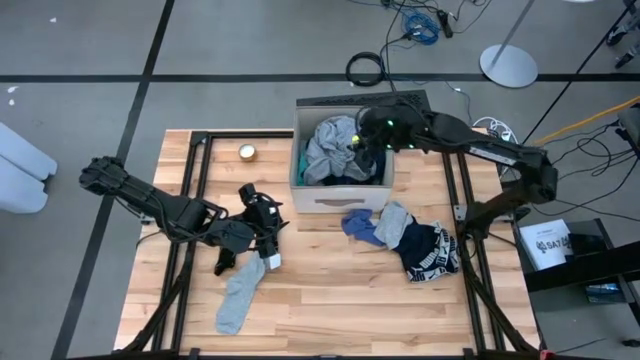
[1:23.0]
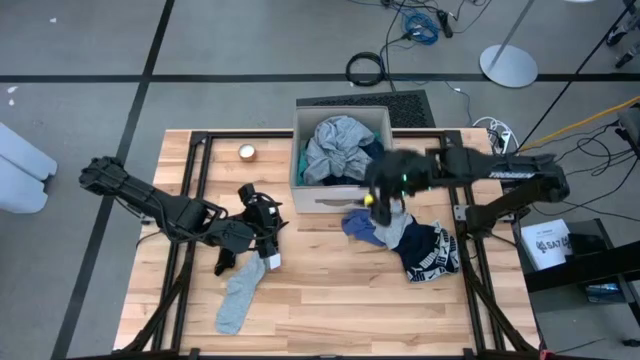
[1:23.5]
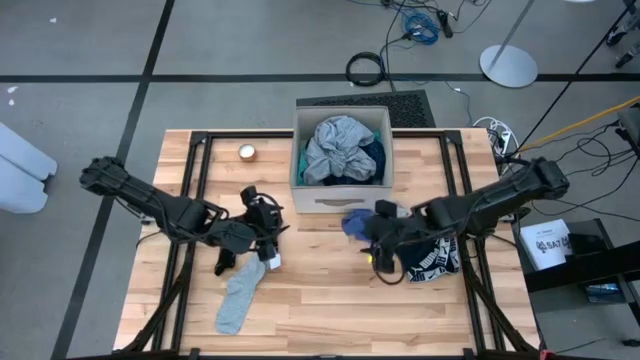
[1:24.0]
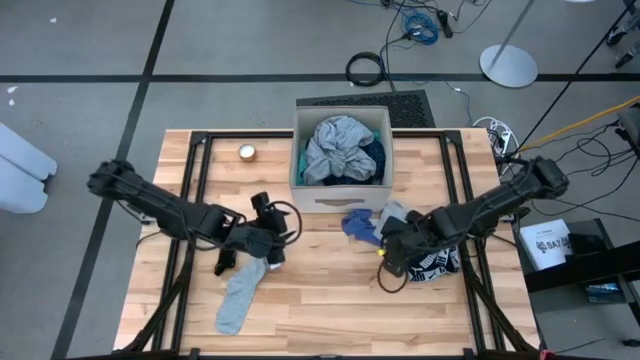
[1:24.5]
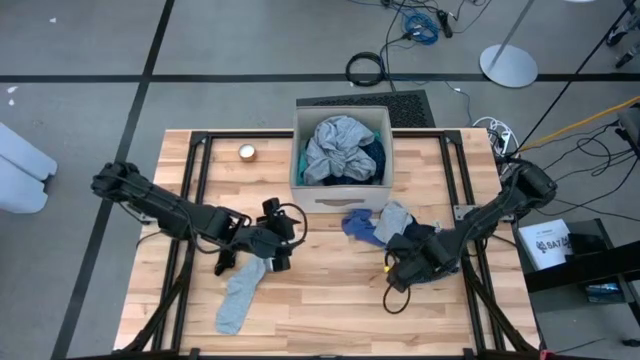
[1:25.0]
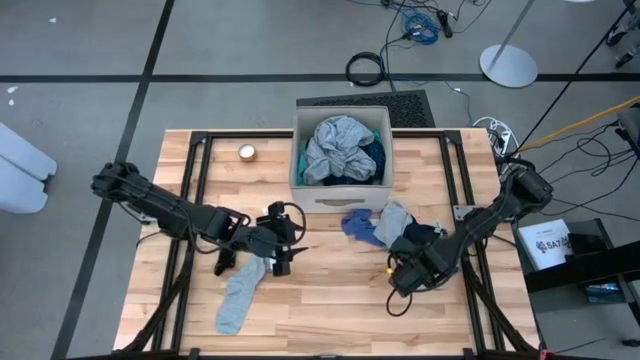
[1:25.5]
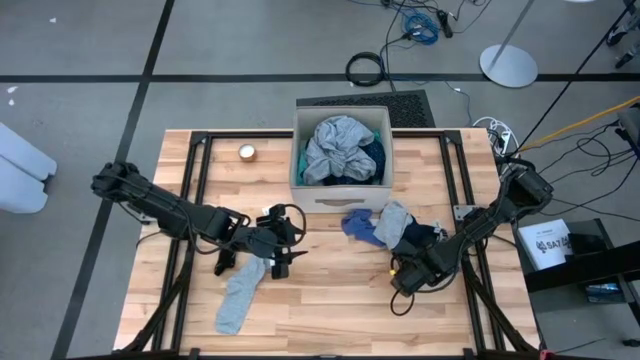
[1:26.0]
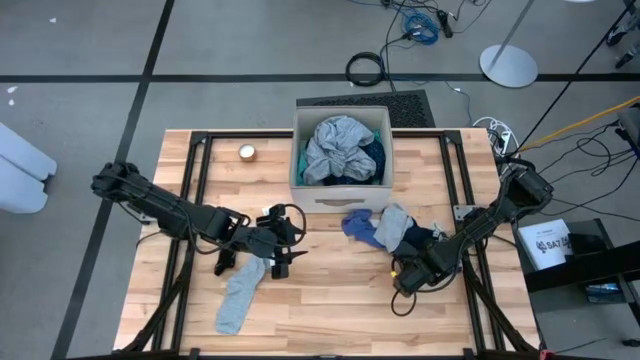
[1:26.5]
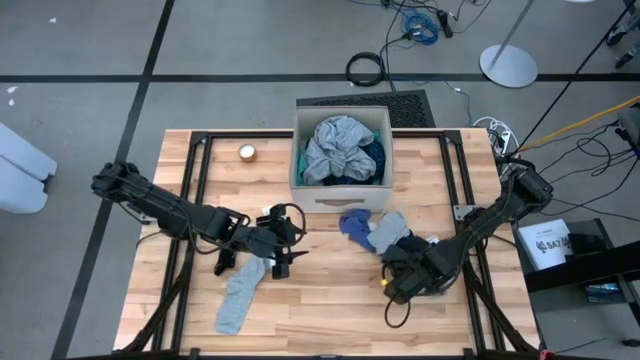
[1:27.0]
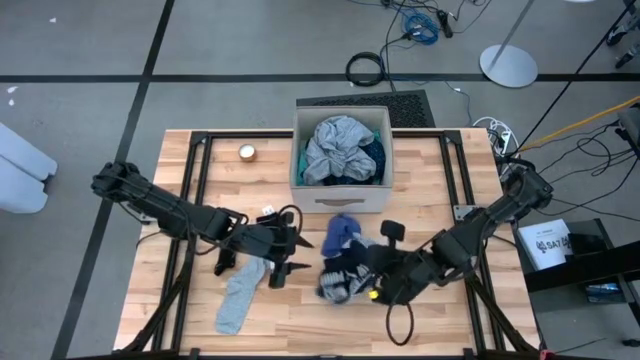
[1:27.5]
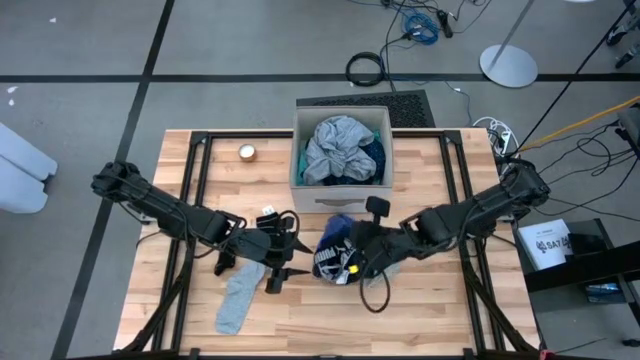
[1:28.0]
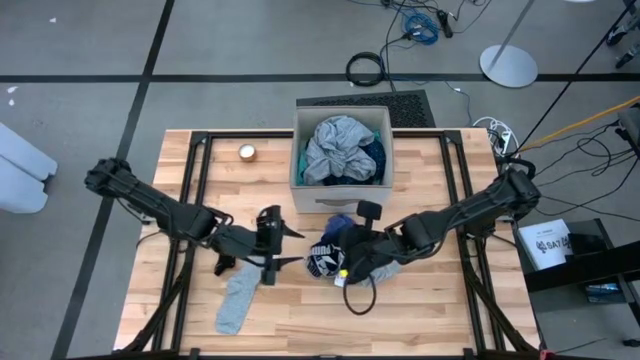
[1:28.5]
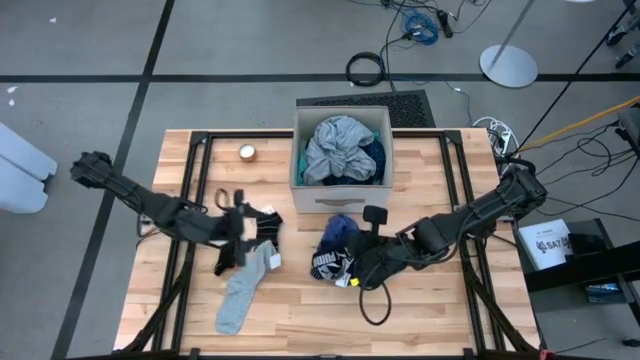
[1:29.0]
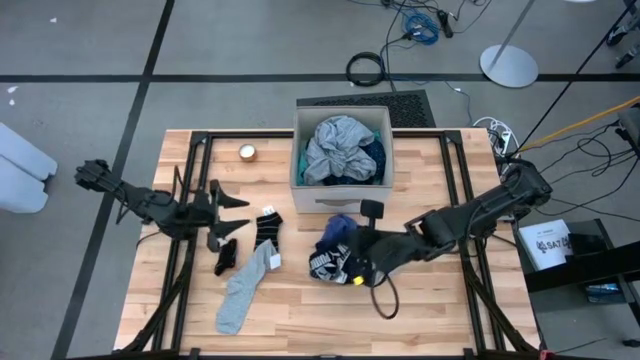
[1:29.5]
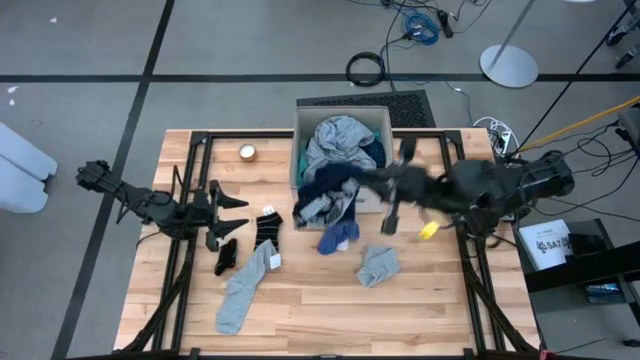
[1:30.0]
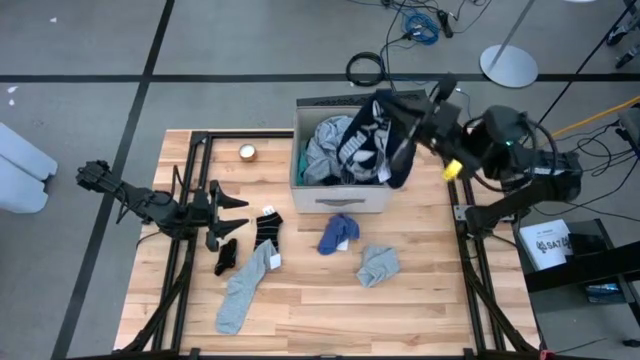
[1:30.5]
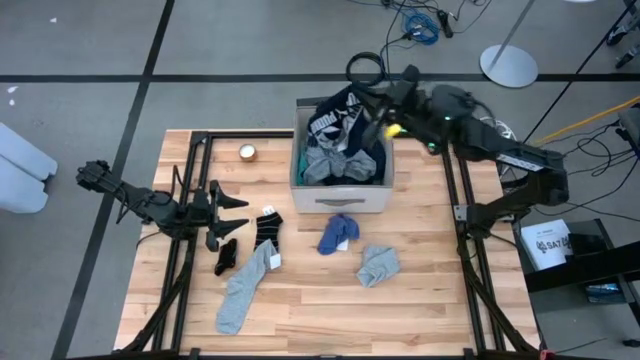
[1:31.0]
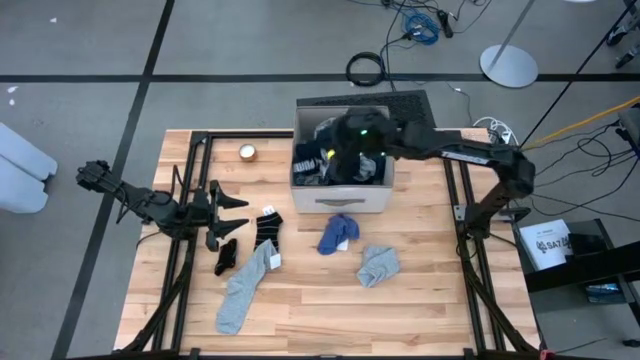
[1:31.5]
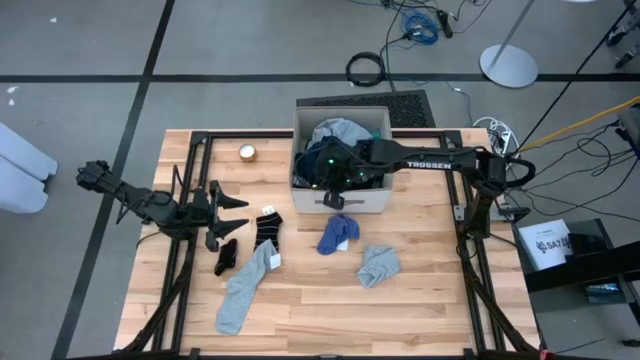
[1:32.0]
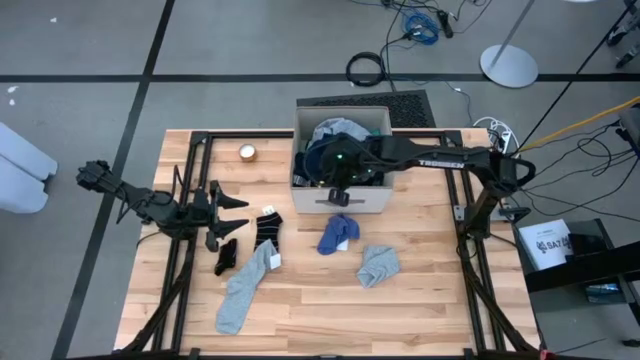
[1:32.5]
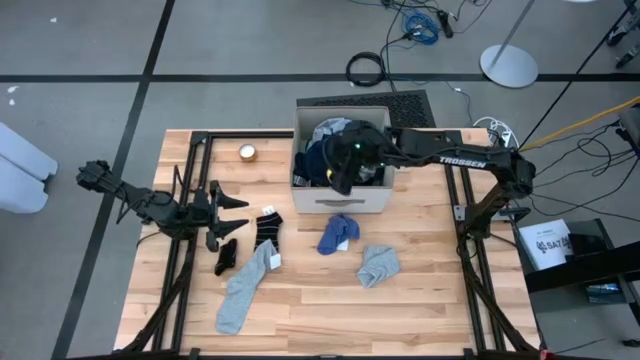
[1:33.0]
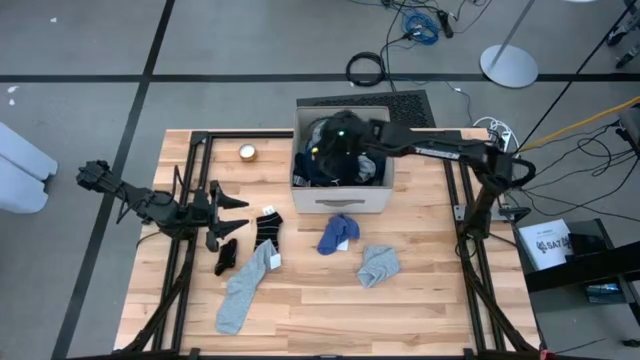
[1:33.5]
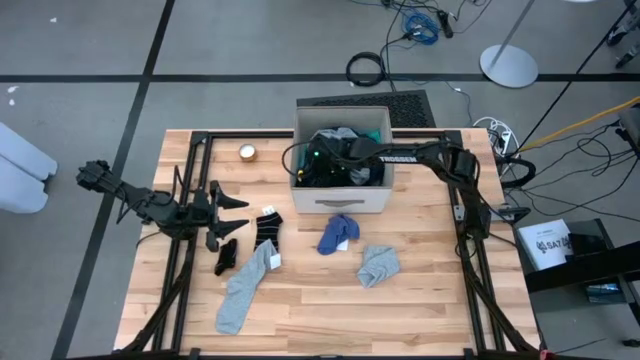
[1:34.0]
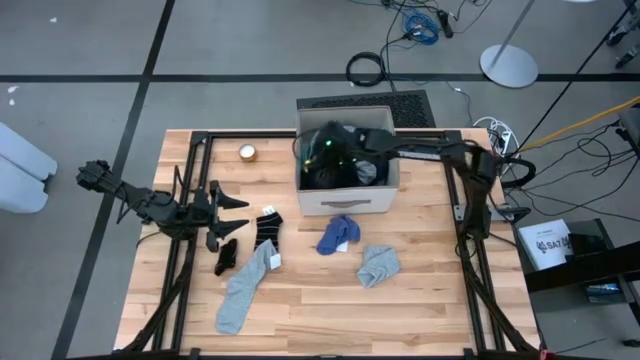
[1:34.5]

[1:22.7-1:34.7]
Task: Sort clothes
Put the dark blue boxers into the laundry organizer

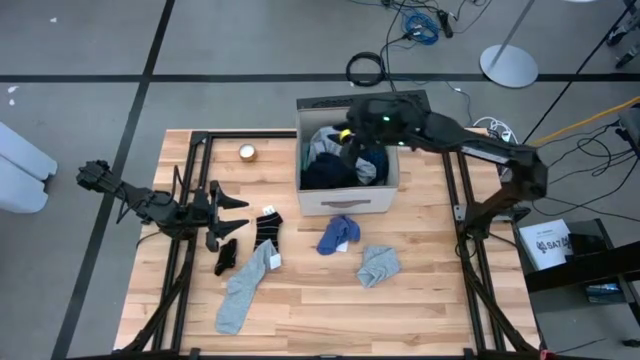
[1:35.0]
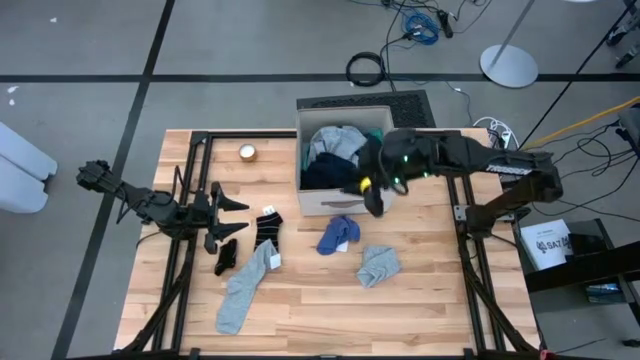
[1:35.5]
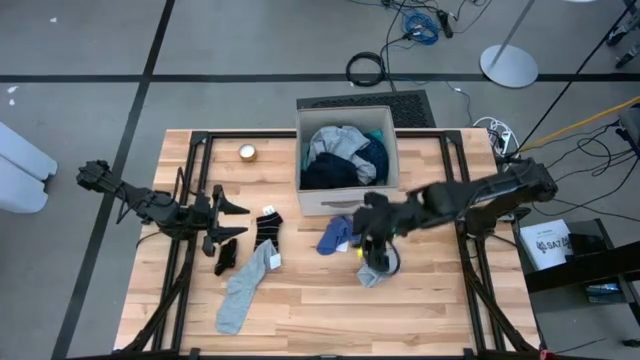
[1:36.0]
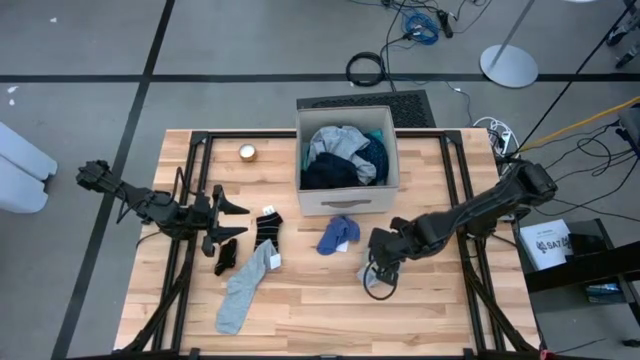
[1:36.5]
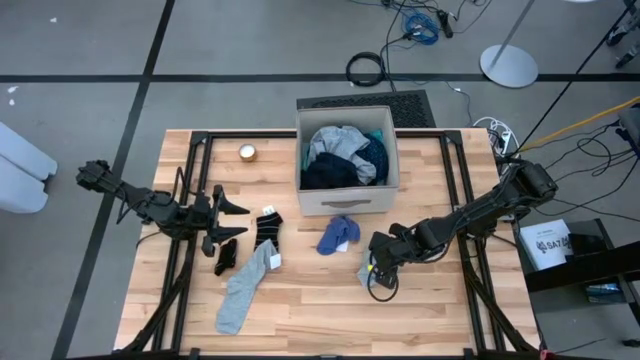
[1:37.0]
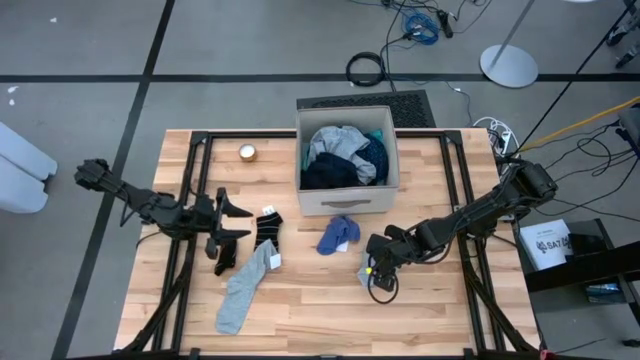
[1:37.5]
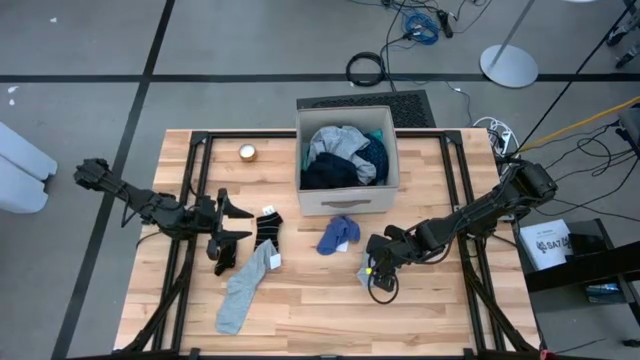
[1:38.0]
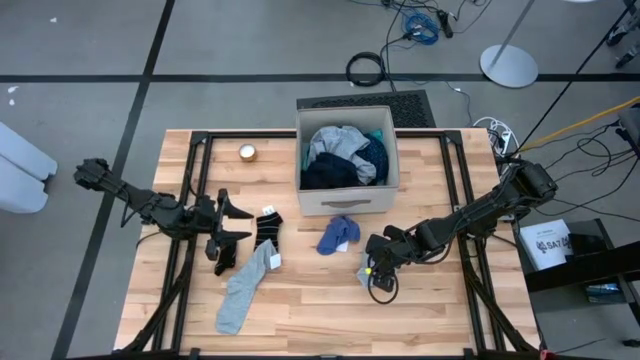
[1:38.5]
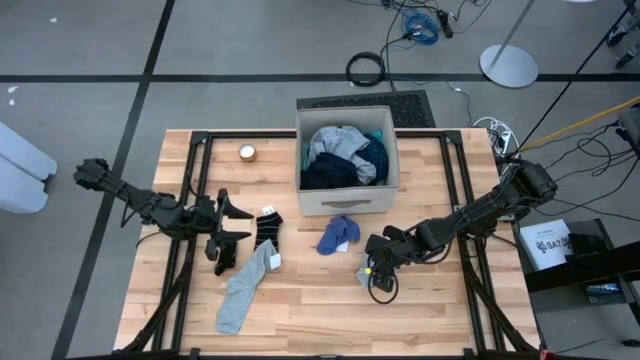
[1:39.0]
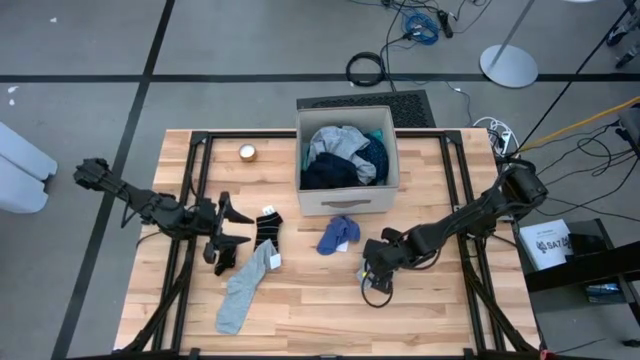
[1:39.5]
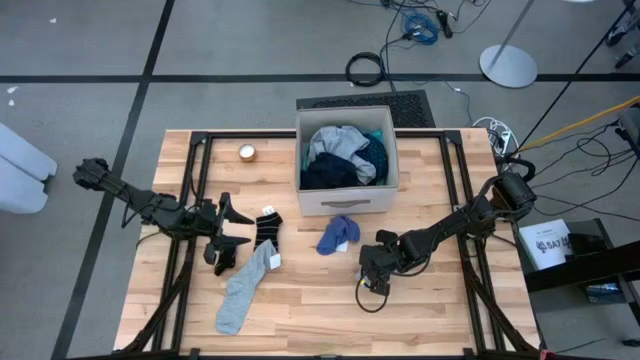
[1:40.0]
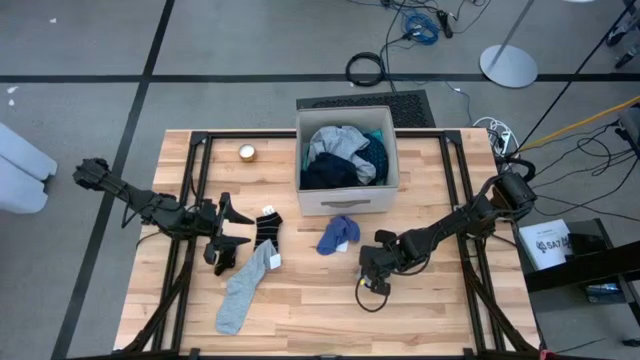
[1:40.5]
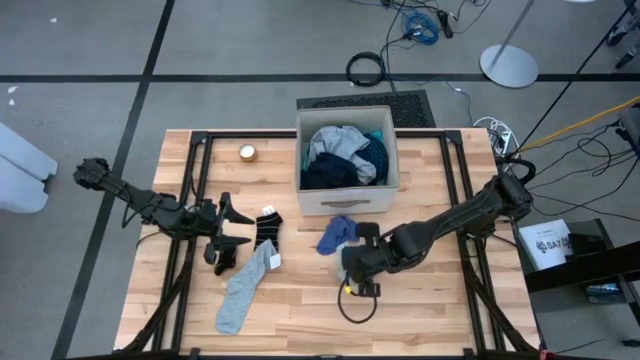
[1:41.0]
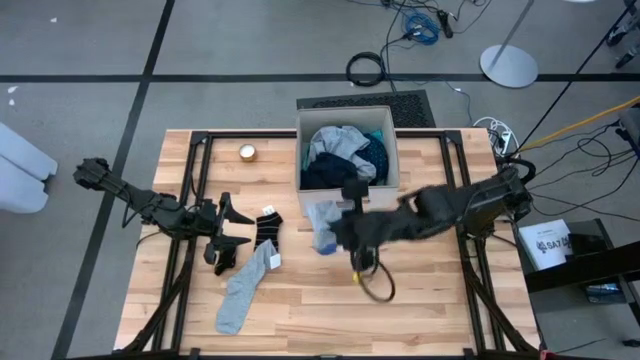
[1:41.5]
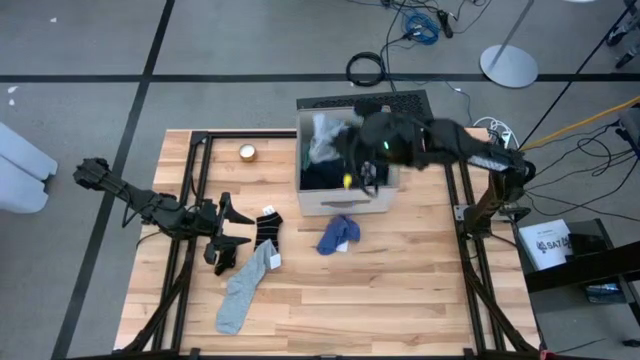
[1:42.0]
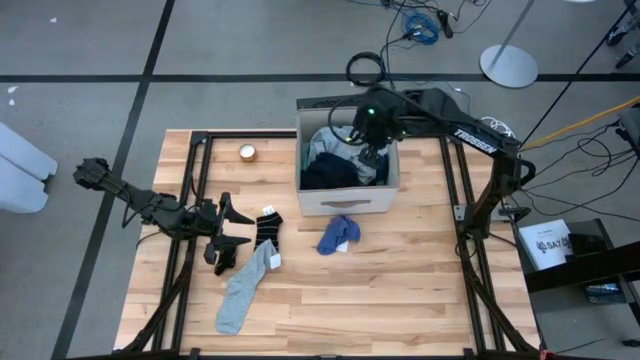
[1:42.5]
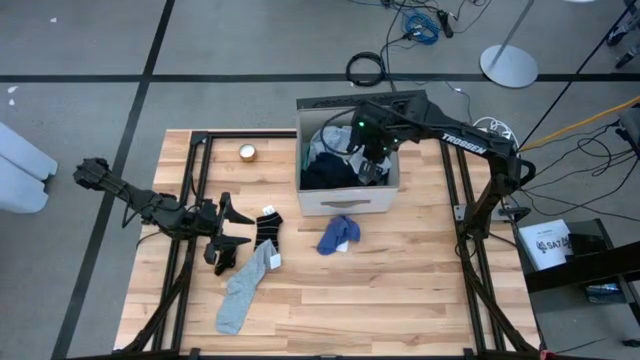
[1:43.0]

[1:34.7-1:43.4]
Put the gray sock into the laundry organizer
